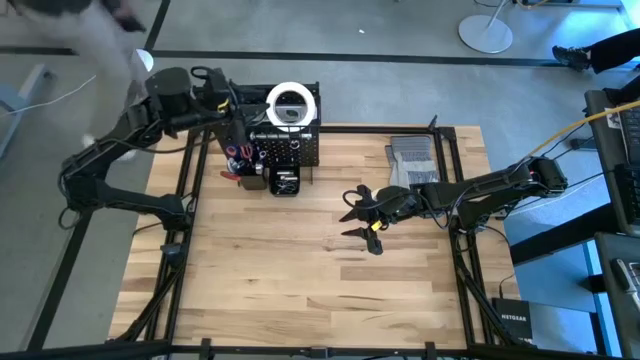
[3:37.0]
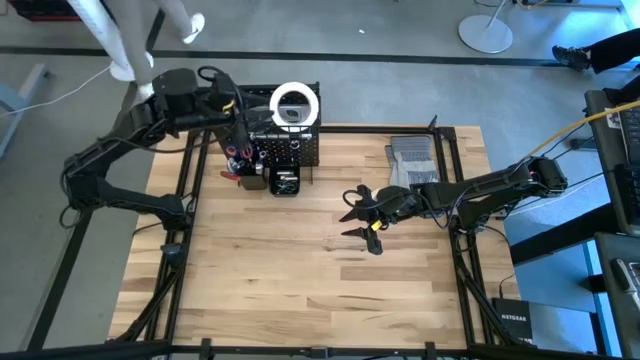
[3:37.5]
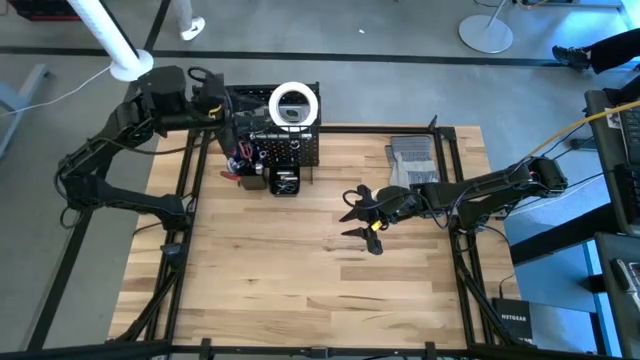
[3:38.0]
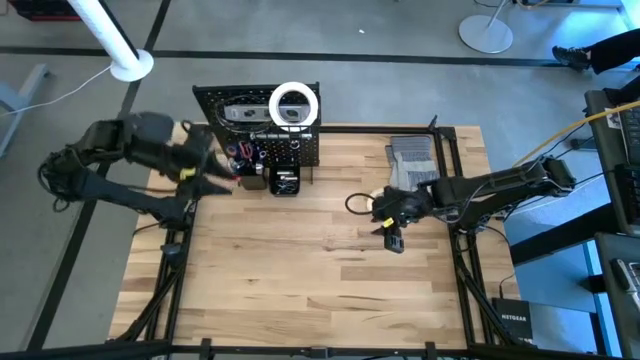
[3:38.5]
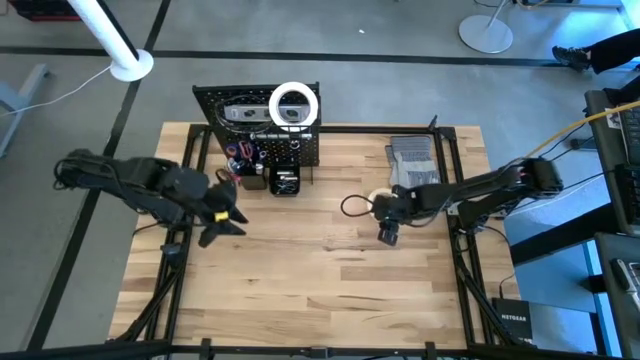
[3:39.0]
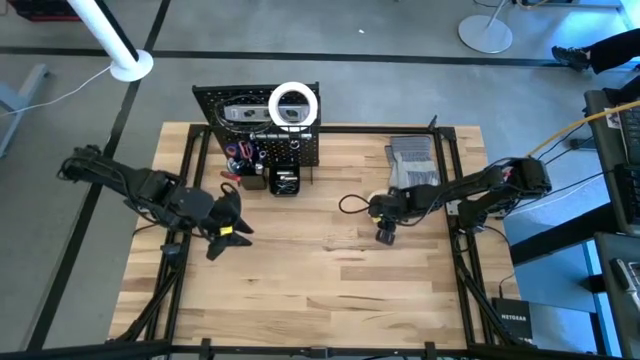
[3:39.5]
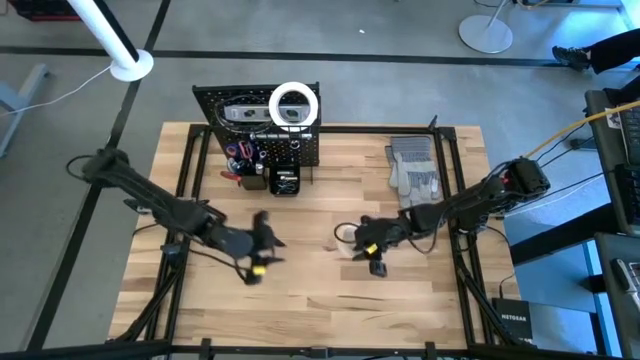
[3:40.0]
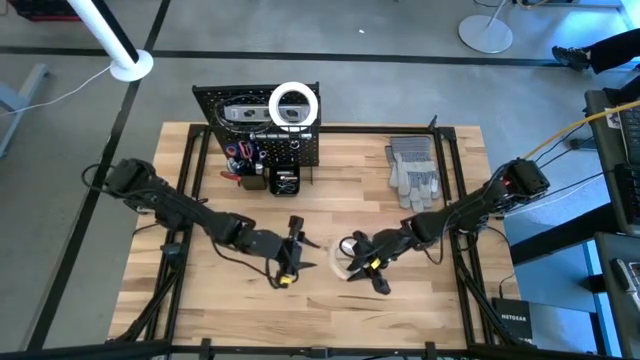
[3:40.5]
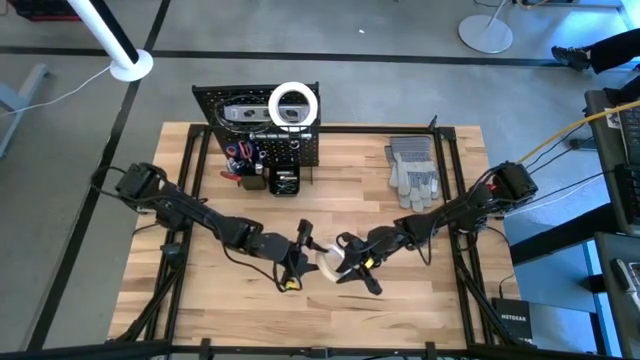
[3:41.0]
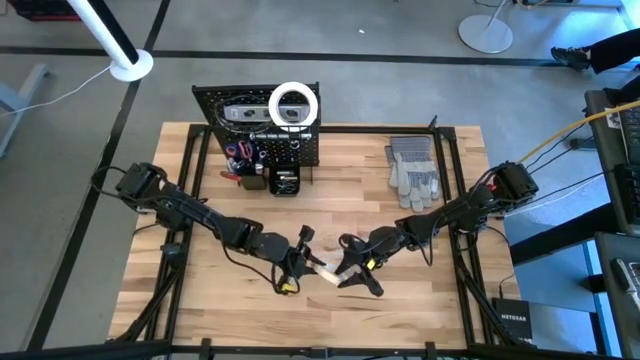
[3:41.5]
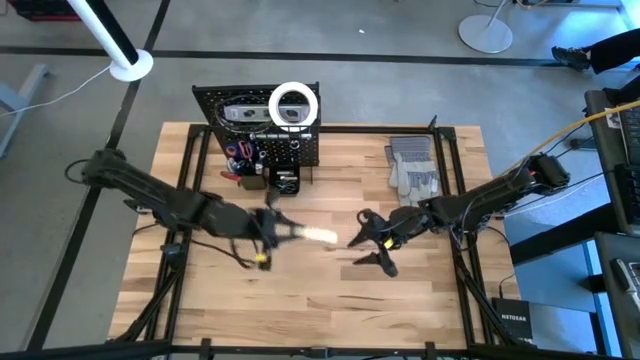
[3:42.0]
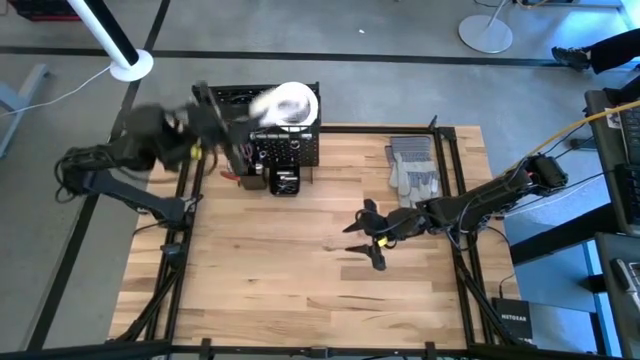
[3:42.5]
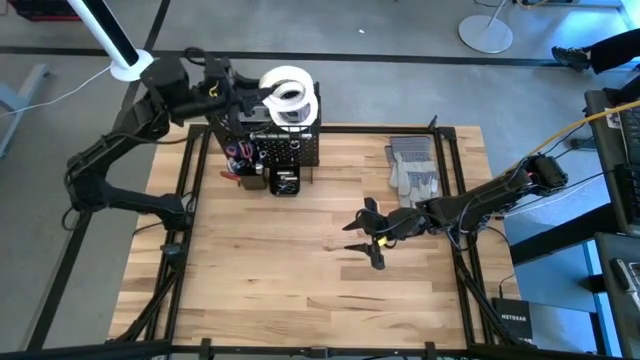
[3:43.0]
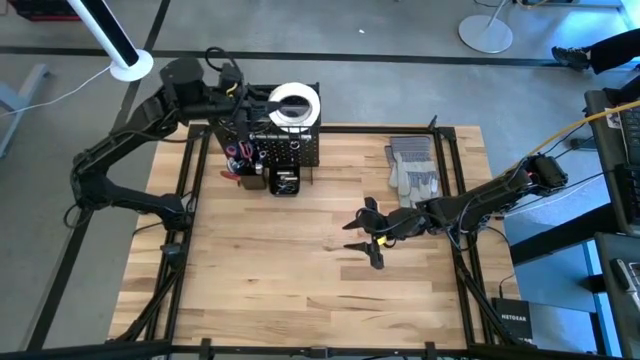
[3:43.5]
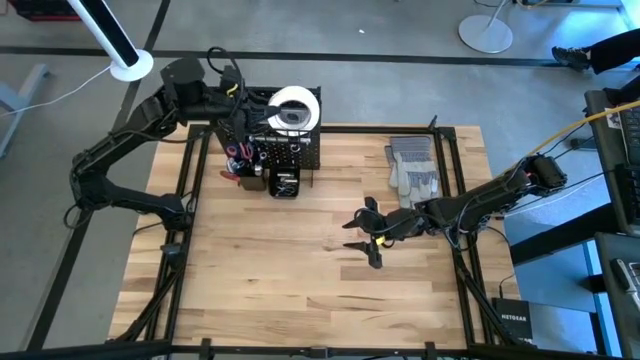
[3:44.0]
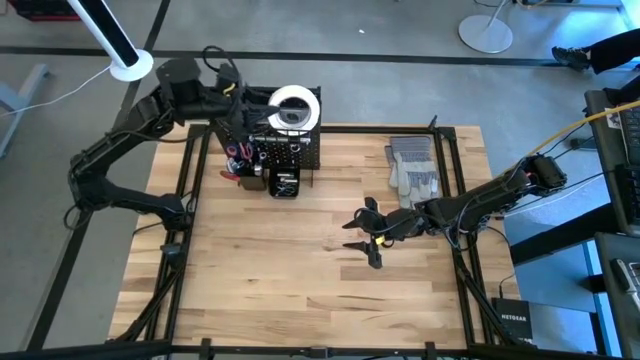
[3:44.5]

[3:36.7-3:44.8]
Task: Hang tools onto peg board
Put the white masking tape on the peg board

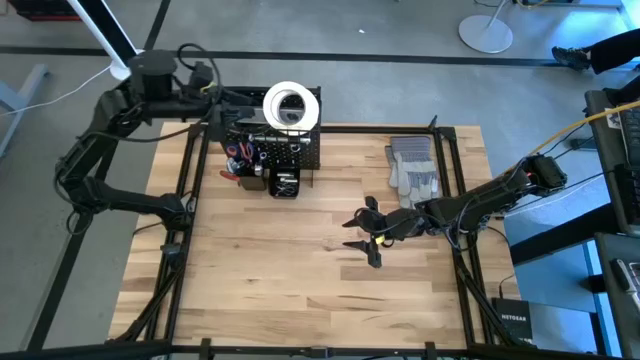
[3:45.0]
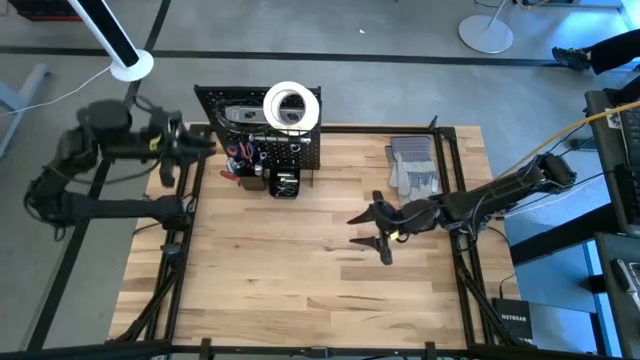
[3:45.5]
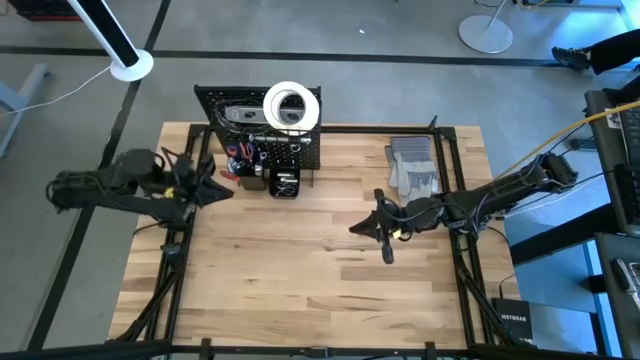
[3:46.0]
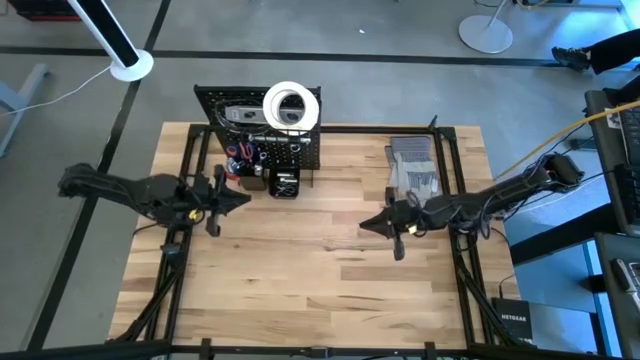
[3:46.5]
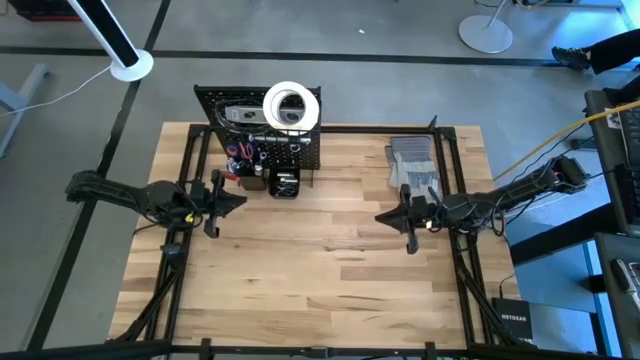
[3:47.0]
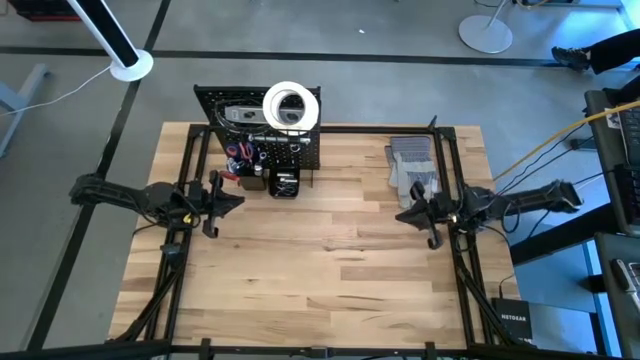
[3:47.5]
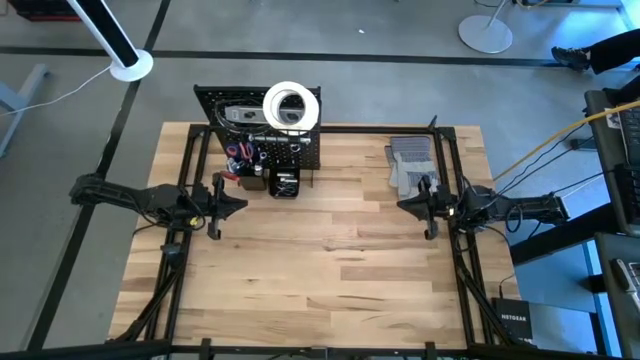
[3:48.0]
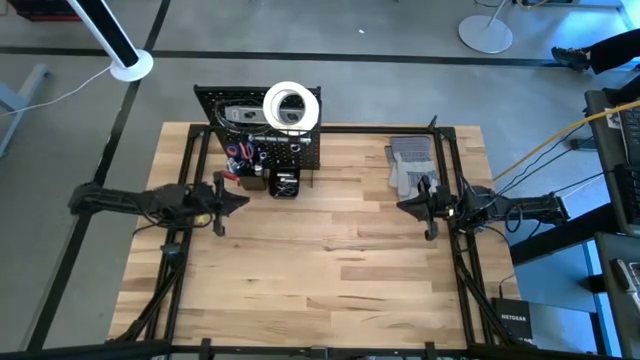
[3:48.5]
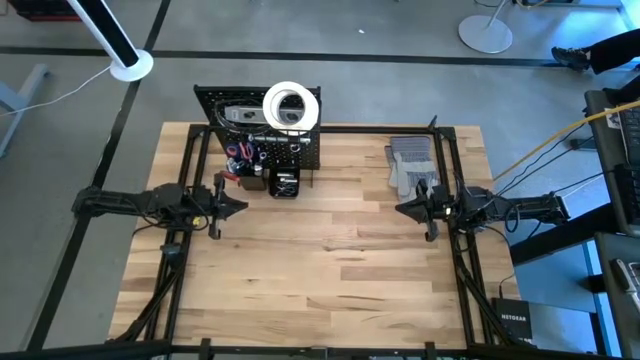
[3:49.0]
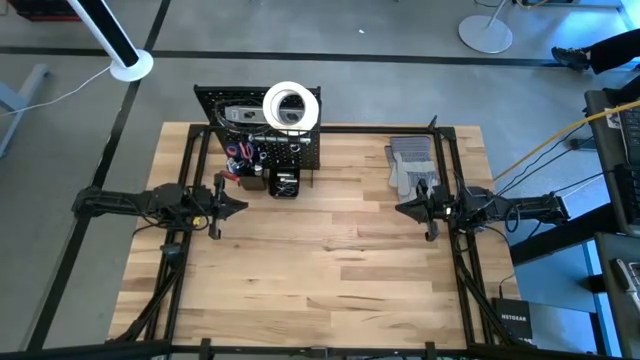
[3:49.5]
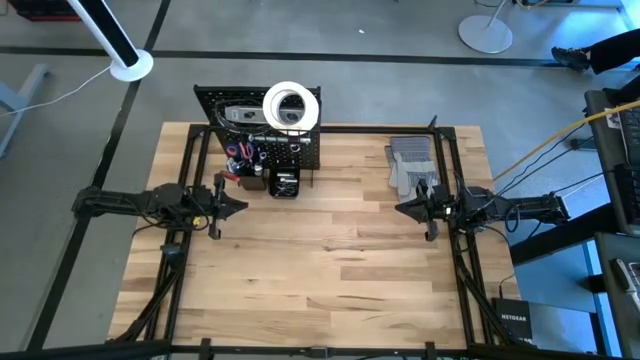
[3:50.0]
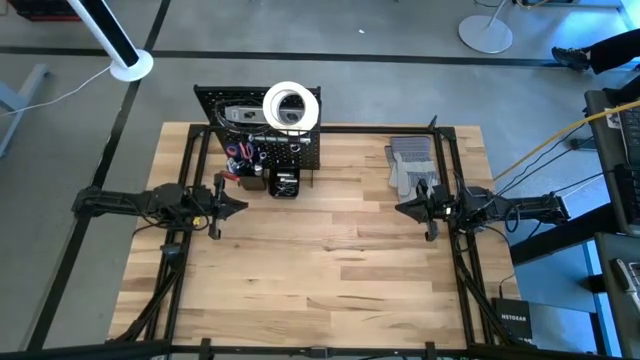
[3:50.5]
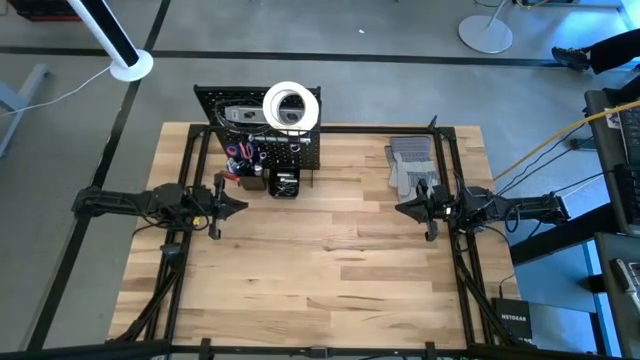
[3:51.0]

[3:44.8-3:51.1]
Return to Home Position

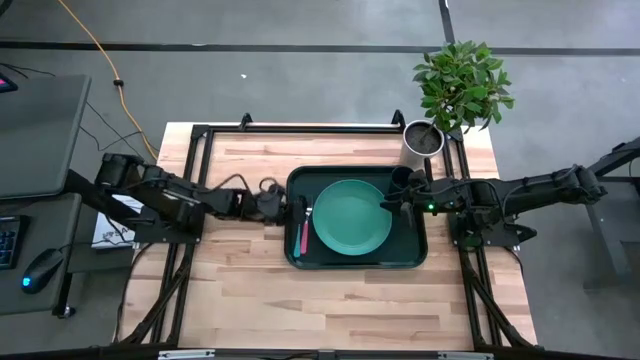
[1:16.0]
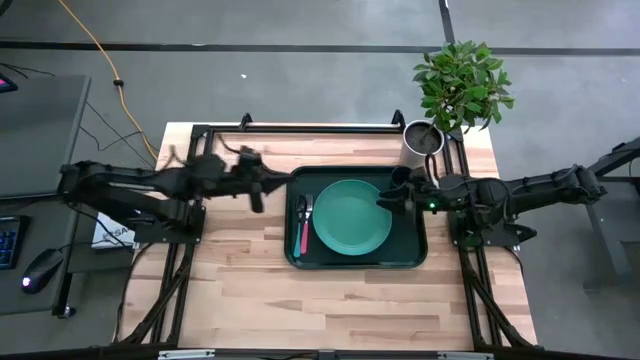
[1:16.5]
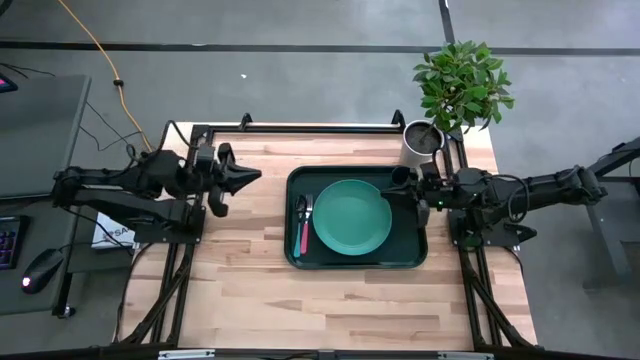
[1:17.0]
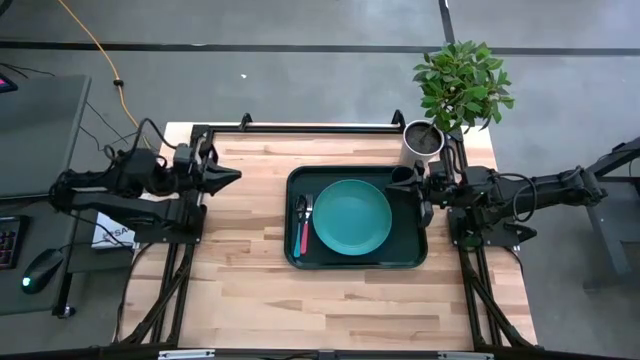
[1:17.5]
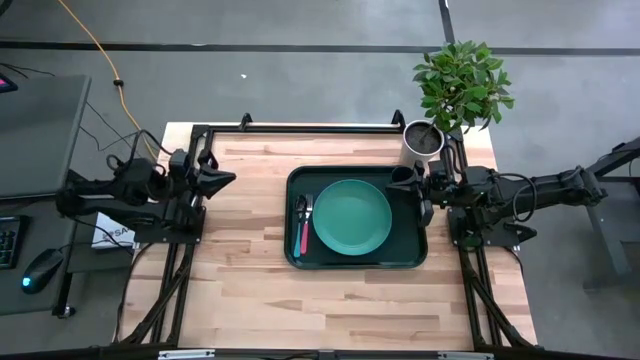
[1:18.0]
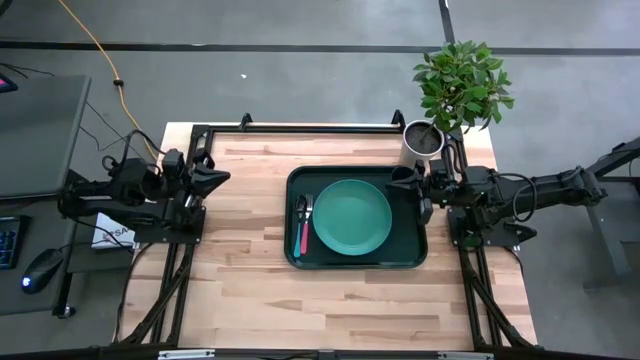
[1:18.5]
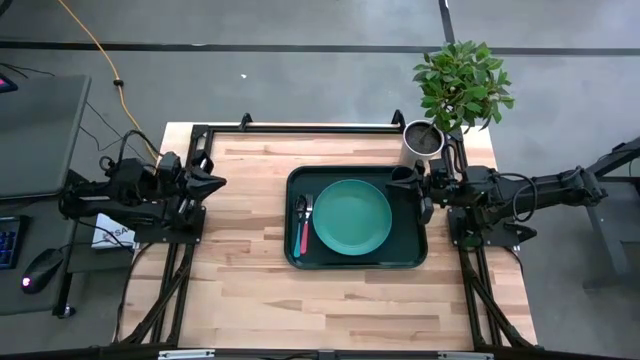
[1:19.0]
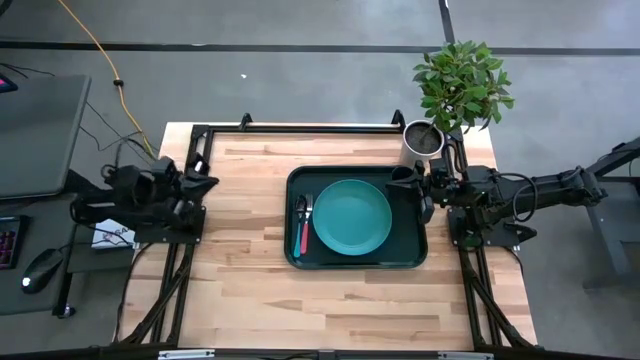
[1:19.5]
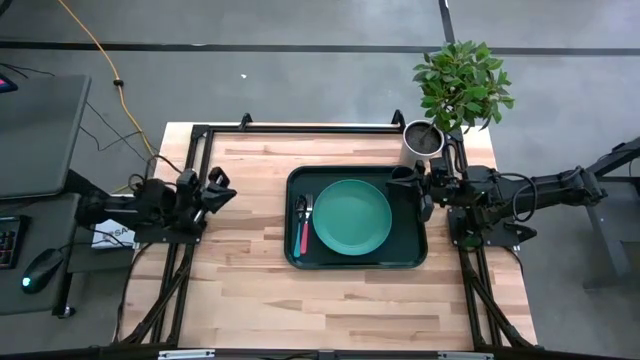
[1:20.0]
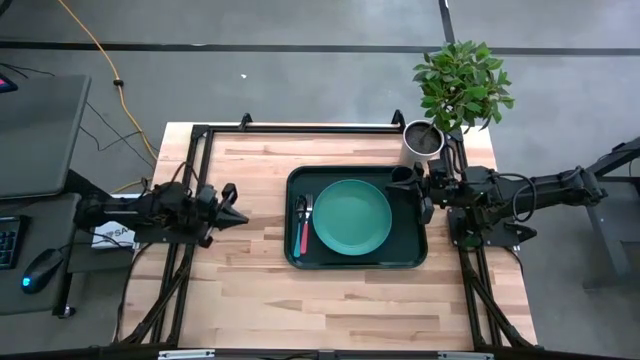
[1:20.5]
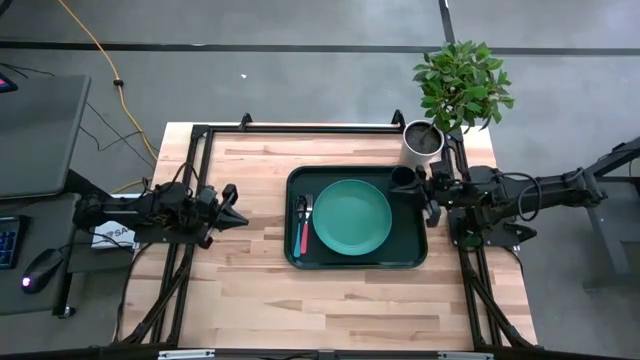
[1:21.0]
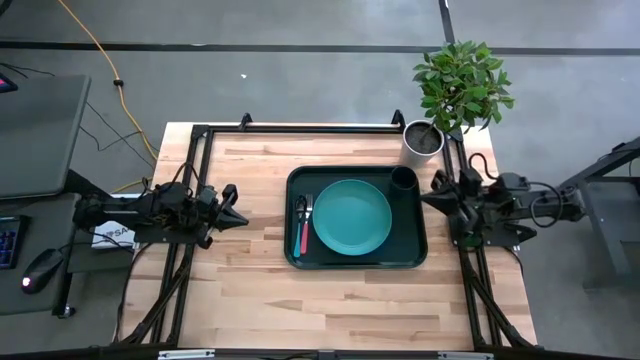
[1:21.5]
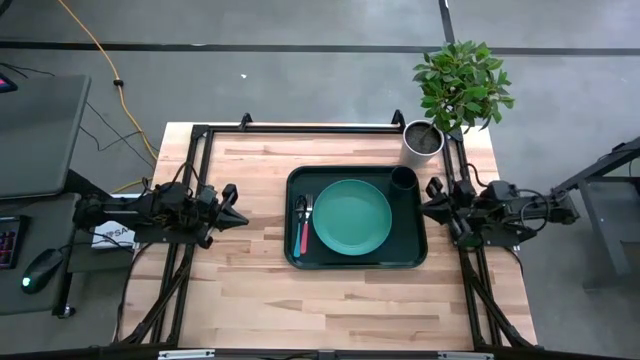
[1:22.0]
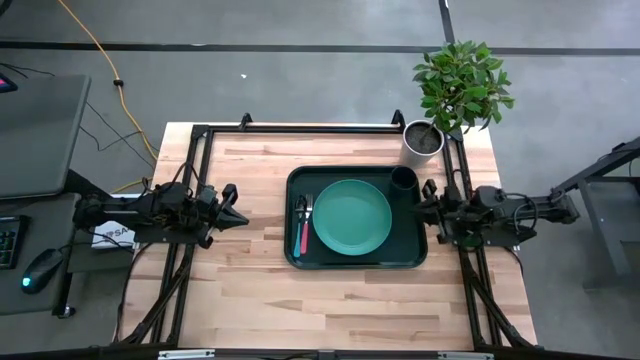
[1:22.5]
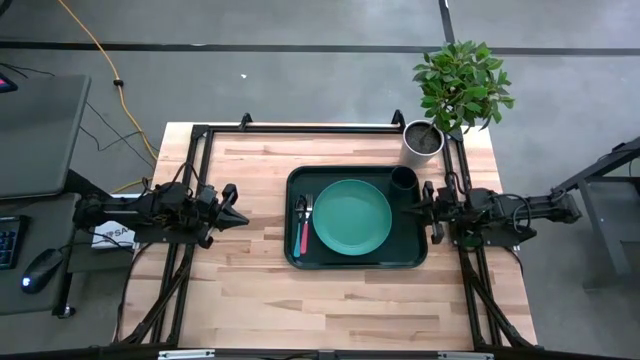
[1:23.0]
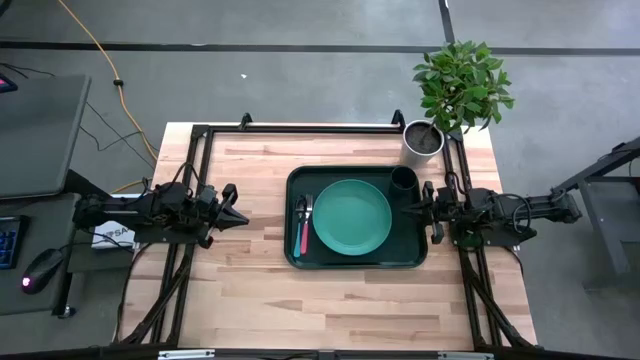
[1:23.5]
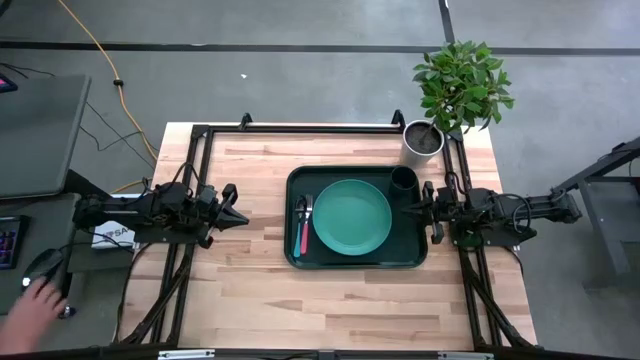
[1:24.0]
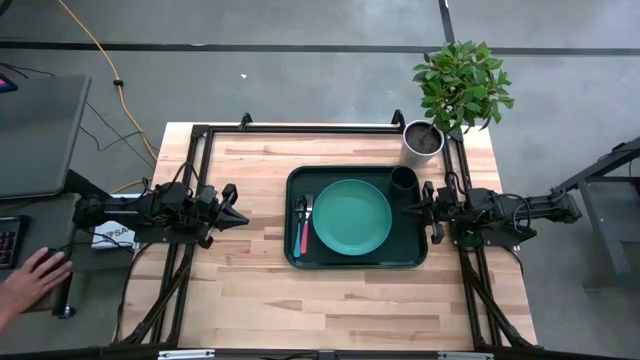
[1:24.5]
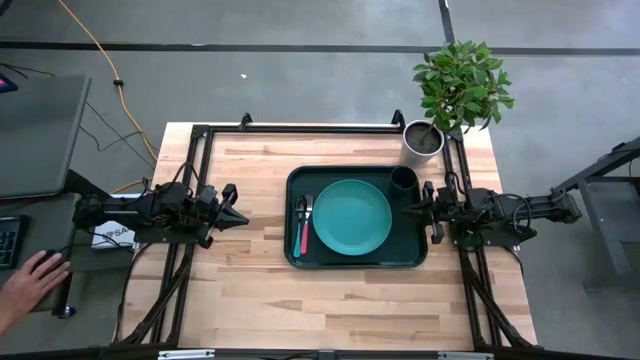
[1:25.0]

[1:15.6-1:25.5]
Task: Pick and place plate/cup/fork/spoon on tray
Return to Home Position
